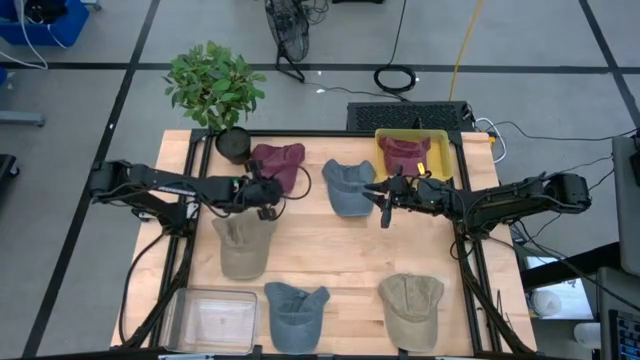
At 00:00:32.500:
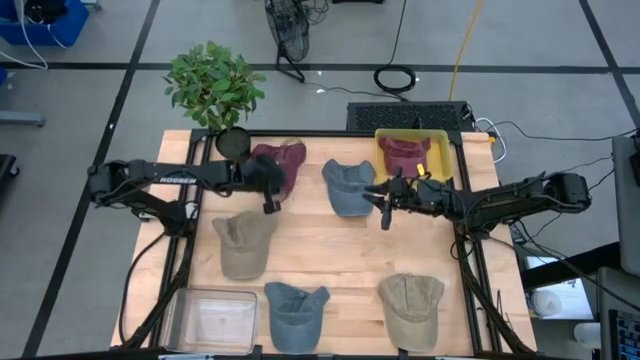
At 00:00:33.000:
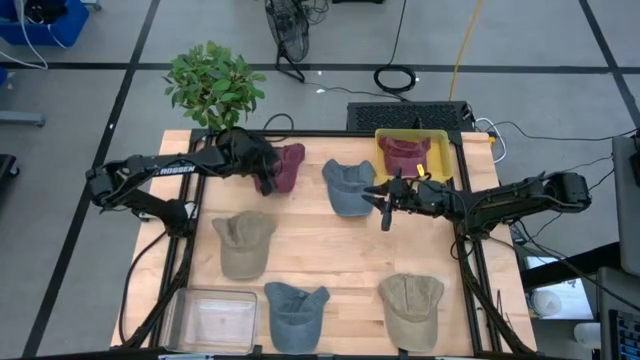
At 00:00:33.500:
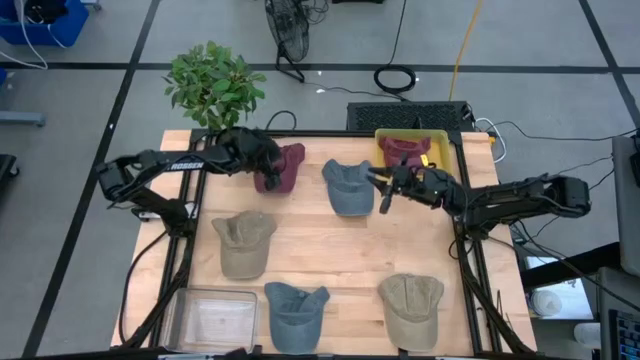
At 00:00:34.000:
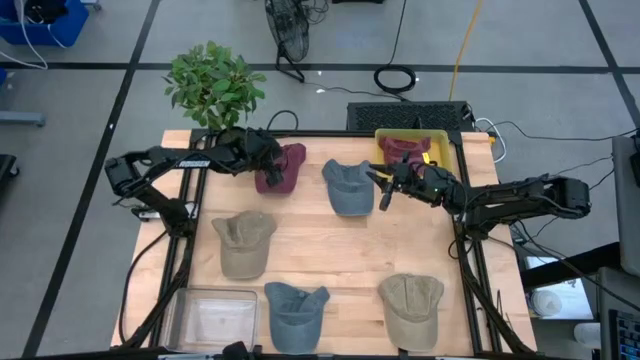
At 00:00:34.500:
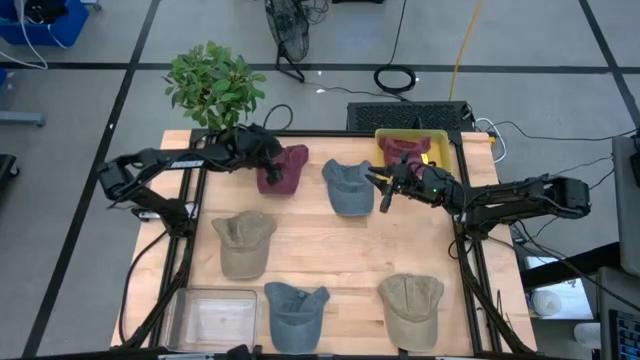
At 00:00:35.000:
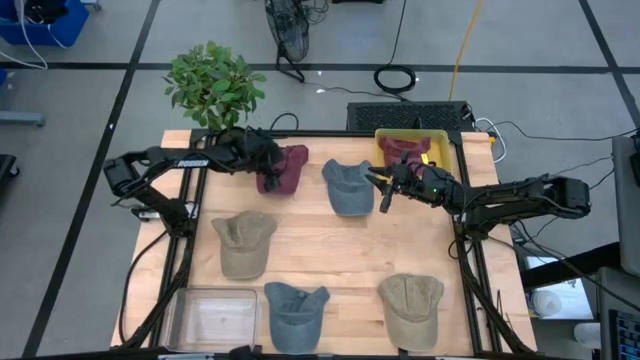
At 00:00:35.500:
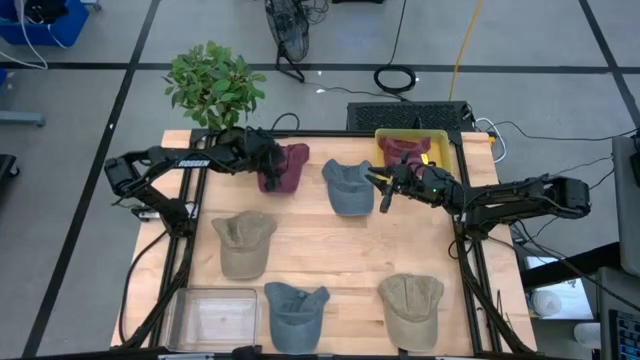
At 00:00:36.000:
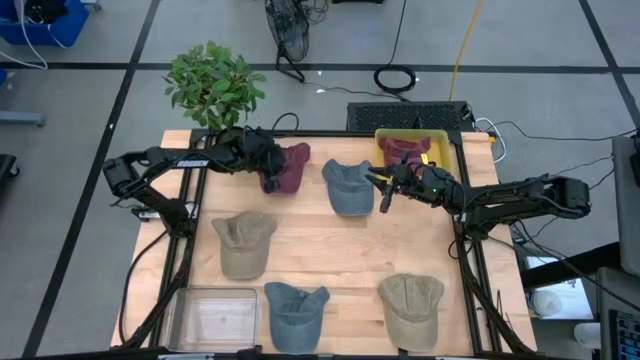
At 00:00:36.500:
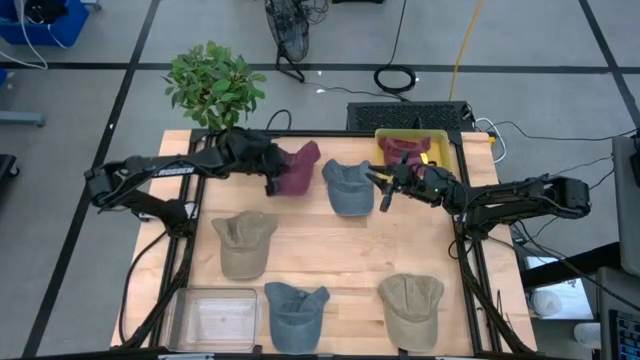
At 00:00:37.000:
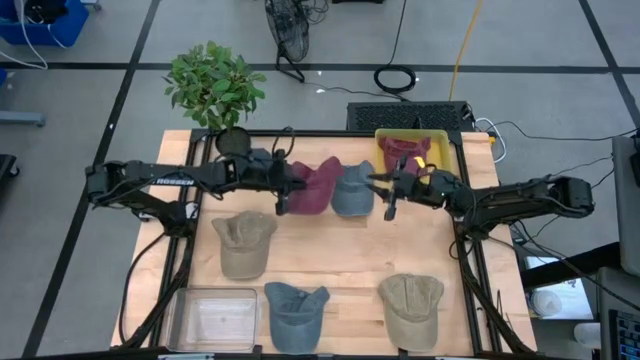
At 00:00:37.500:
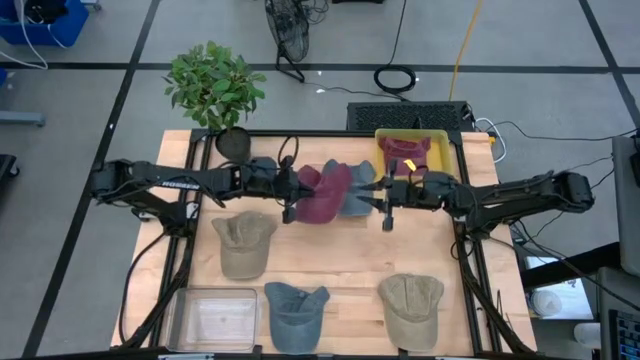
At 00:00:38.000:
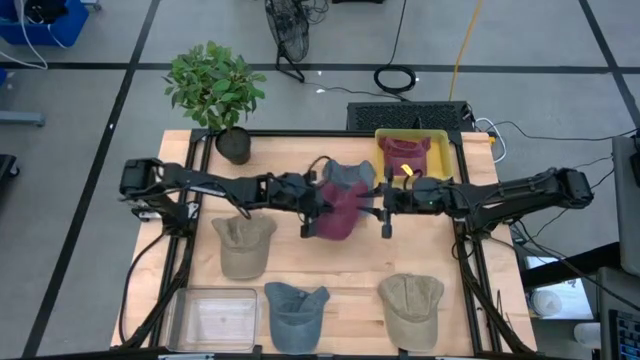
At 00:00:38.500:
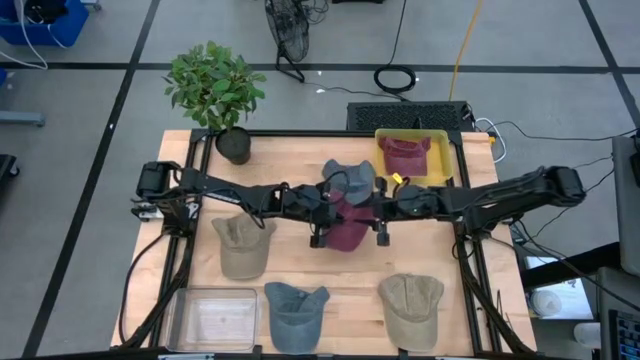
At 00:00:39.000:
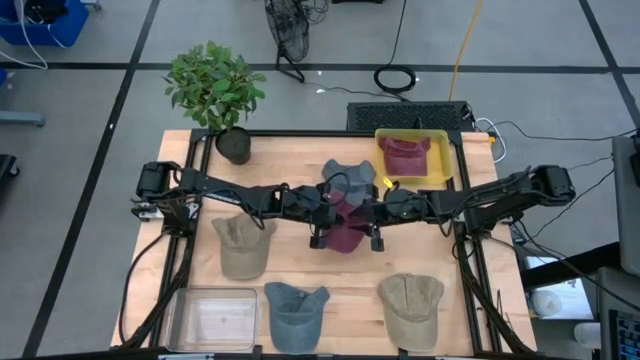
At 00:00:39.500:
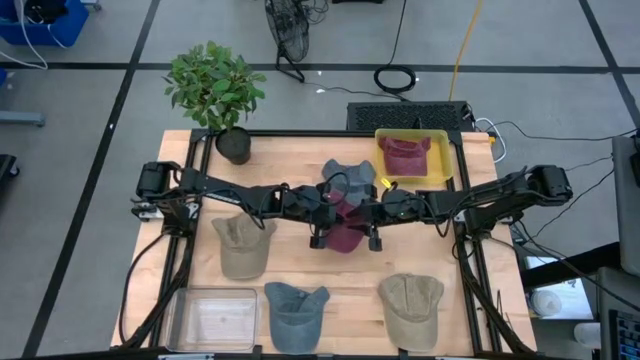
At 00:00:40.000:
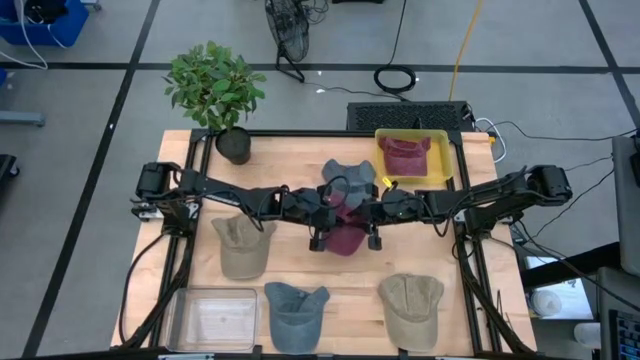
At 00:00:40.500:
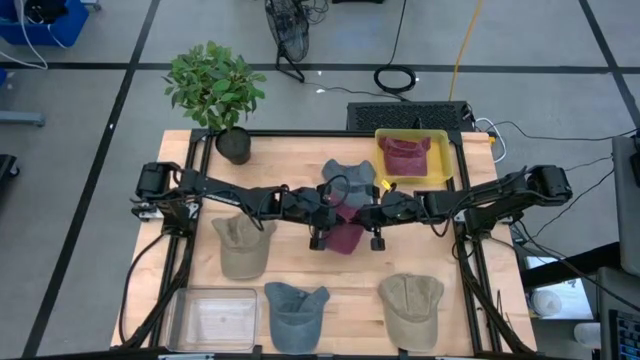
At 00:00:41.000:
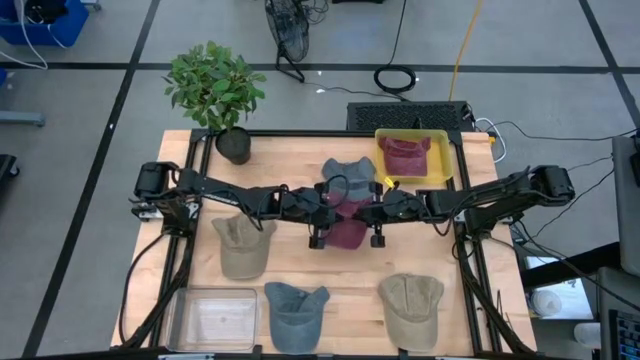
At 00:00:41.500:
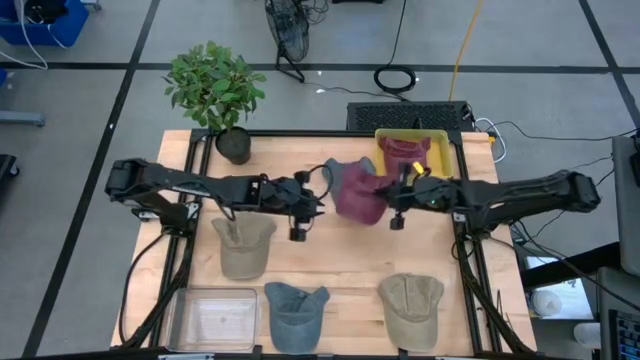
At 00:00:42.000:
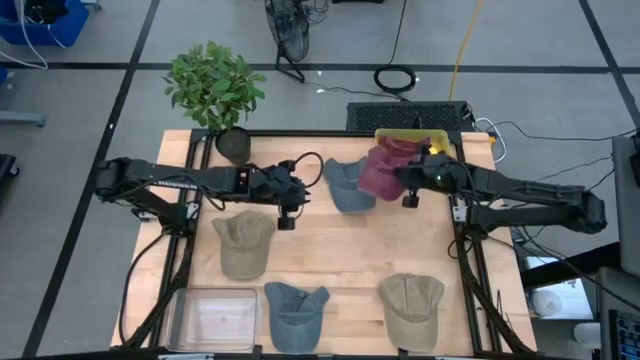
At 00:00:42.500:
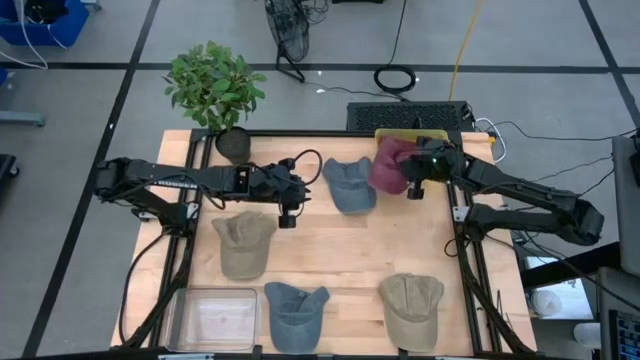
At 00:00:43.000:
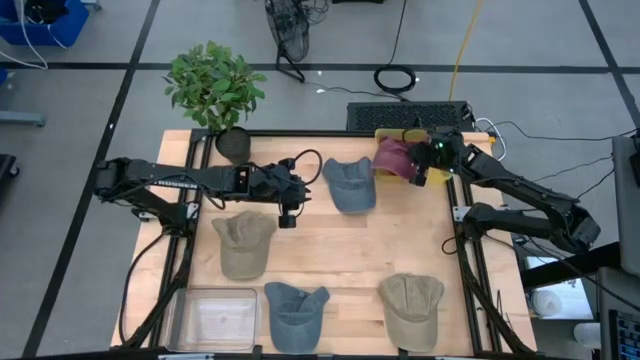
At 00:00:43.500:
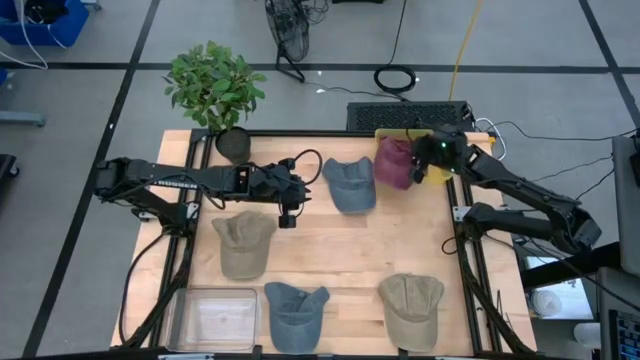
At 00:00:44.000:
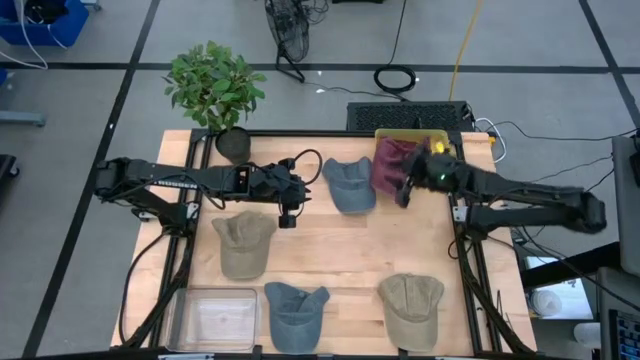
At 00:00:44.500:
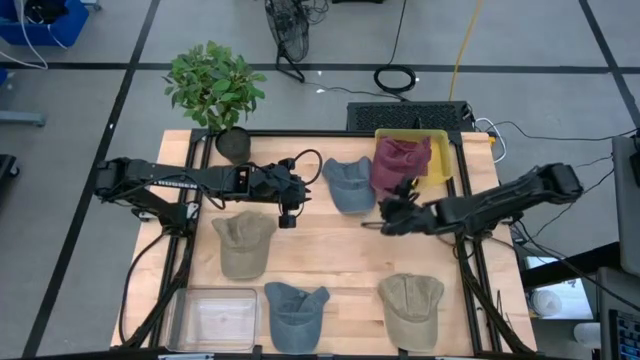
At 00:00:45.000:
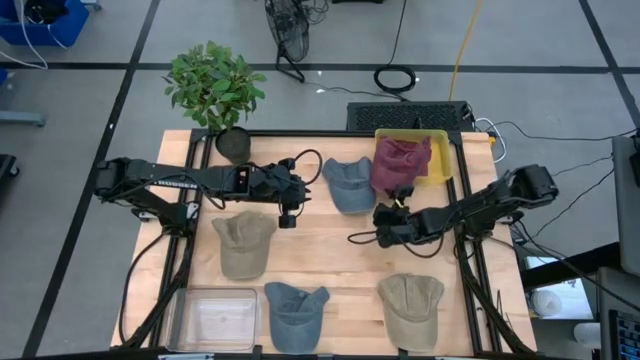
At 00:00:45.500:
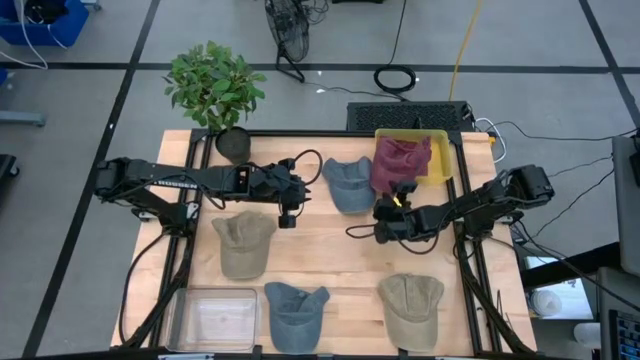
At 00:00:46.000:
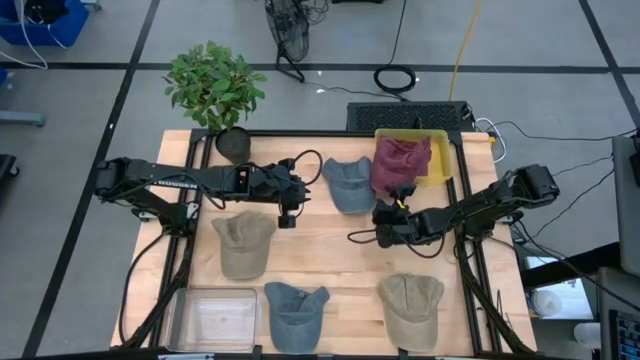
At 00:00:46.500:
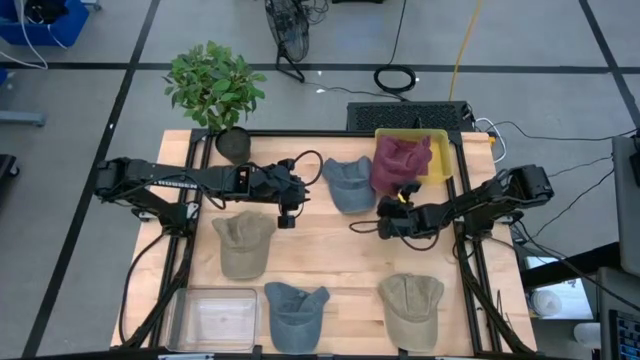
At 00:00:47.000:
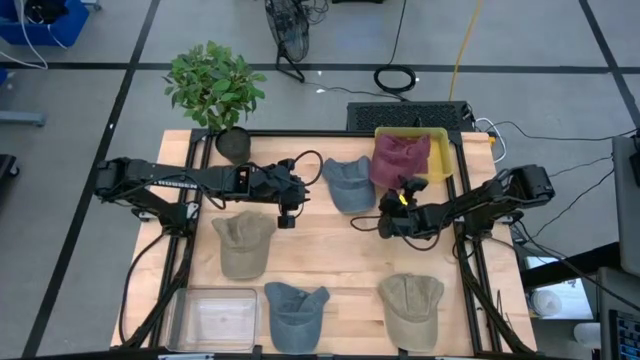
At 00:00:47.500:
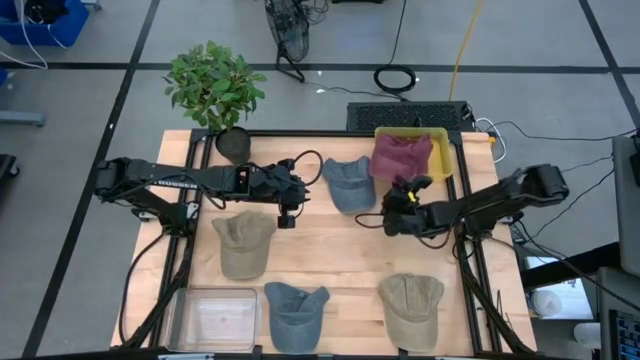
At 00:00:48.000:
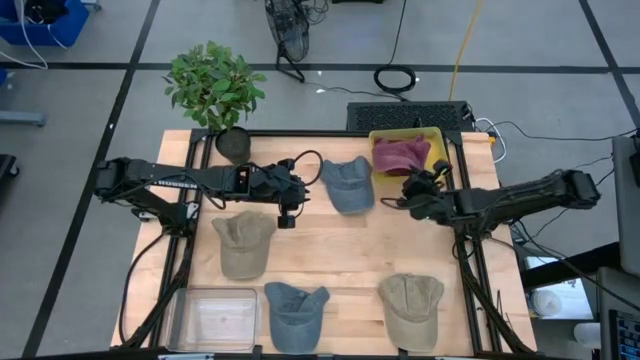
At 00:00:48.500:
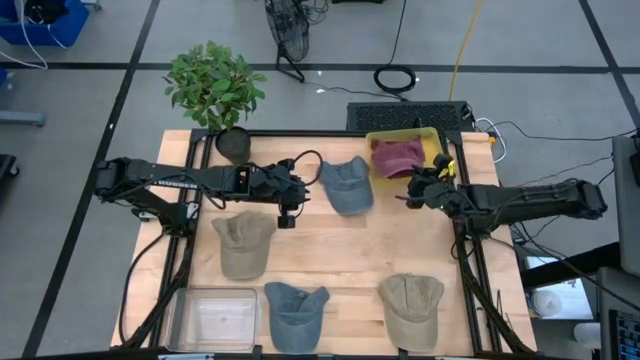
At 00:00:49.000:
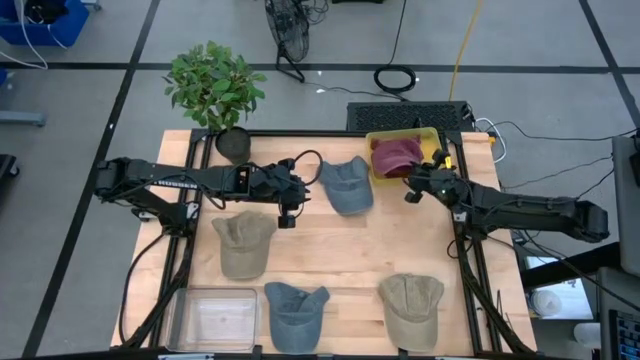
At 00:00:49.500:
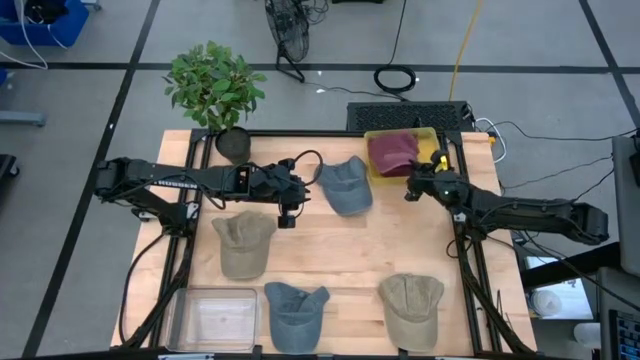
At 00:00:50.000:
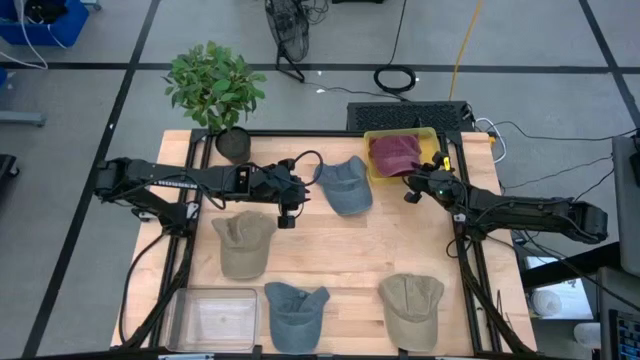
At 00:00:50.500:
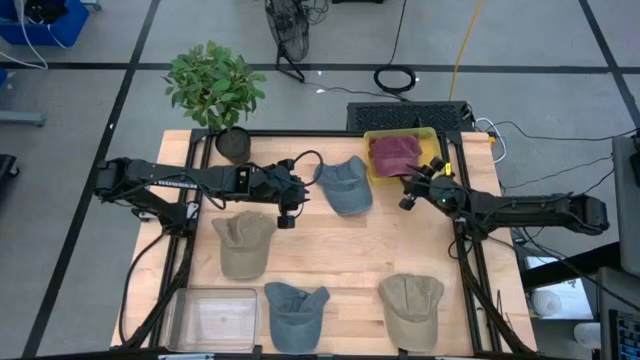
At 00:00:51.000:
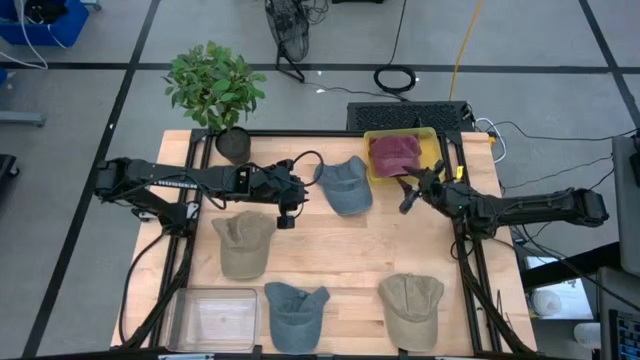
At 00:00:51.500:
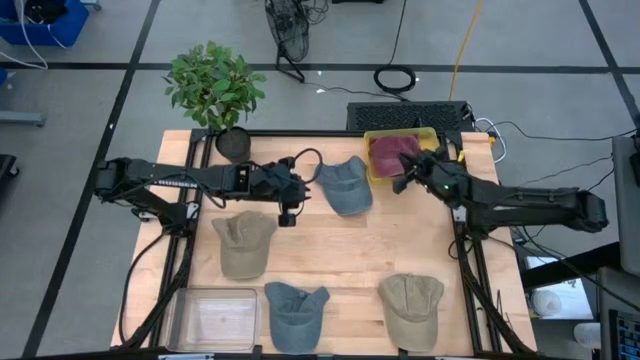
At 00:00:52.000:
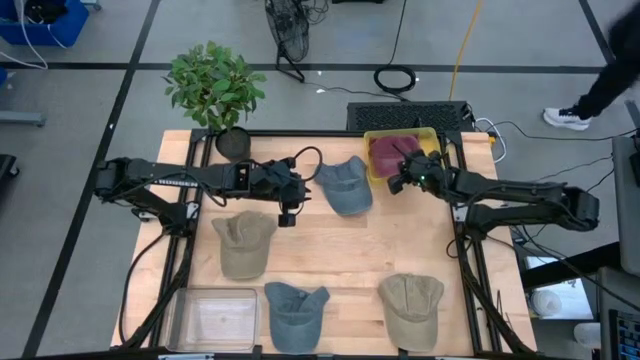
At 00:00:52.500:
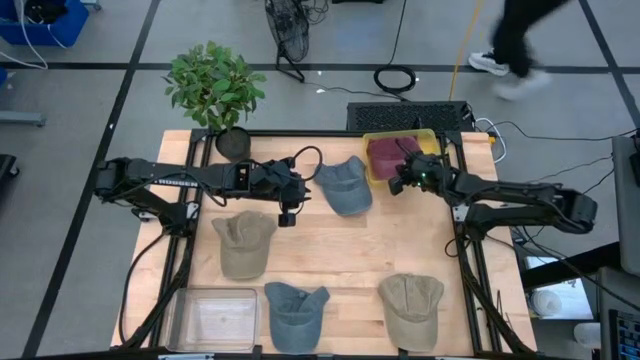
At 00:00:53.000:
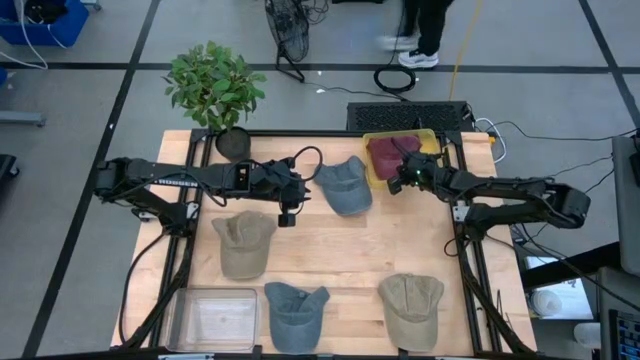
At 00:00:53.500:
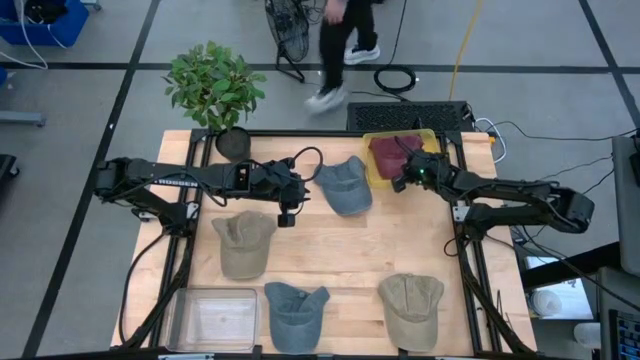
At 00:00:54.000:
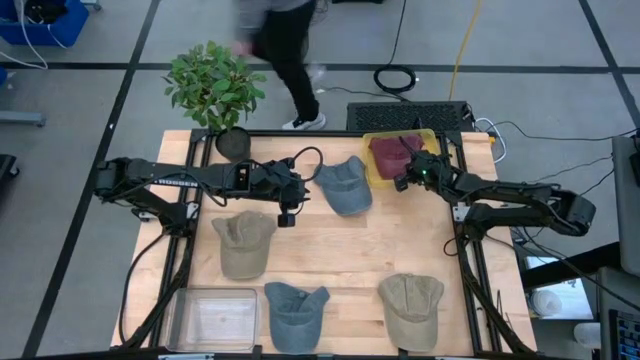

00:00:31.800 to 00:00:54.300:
Task: Pick & Place hat
Put the pale red cap into the yellow bin
